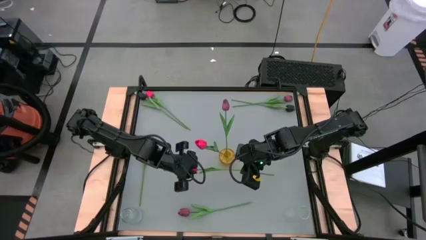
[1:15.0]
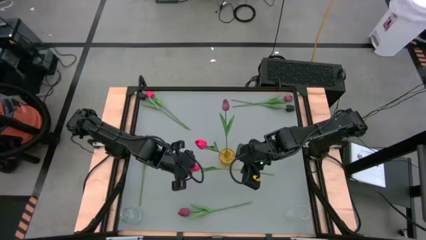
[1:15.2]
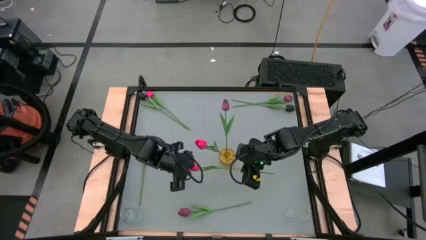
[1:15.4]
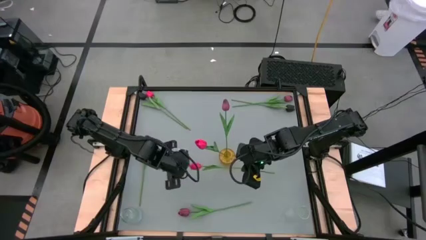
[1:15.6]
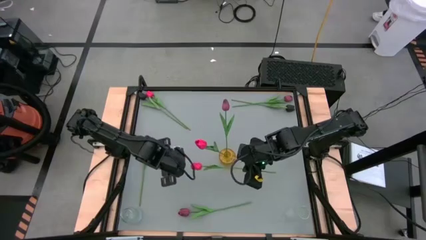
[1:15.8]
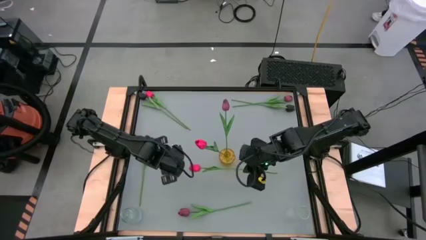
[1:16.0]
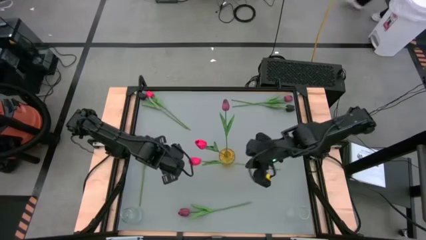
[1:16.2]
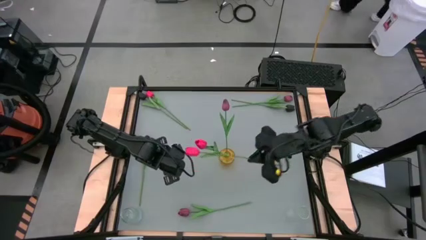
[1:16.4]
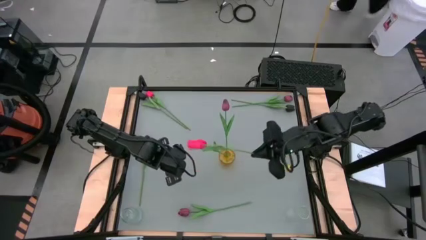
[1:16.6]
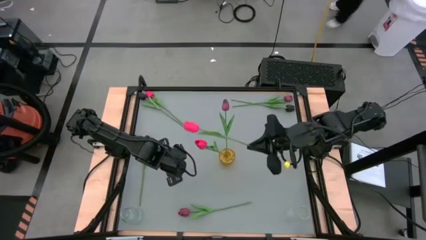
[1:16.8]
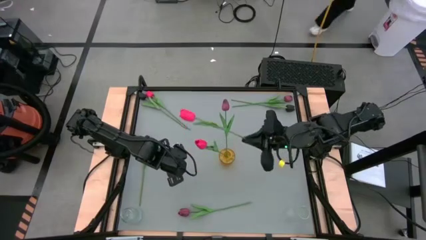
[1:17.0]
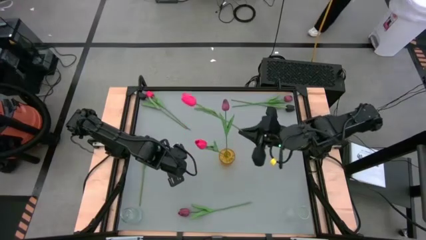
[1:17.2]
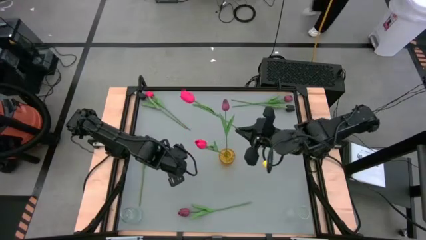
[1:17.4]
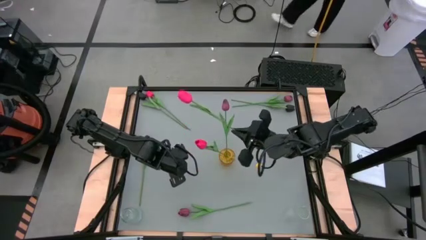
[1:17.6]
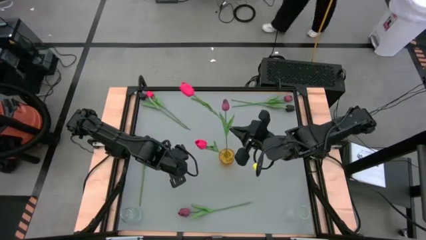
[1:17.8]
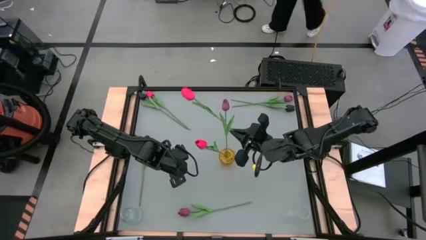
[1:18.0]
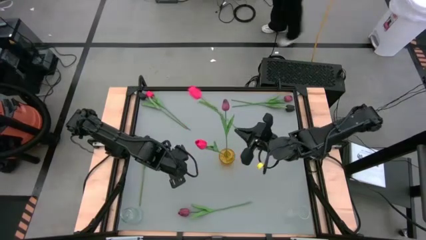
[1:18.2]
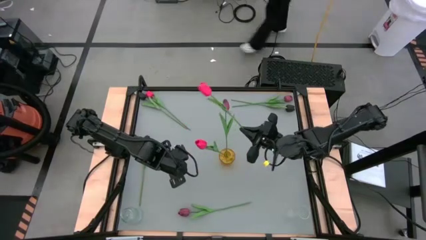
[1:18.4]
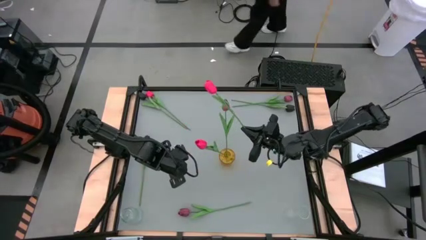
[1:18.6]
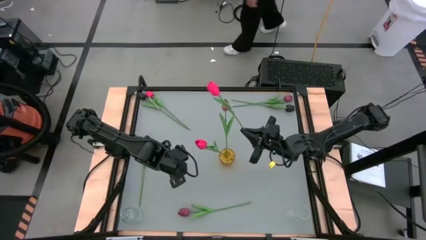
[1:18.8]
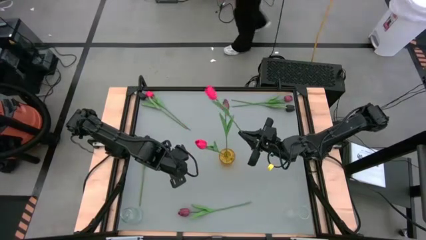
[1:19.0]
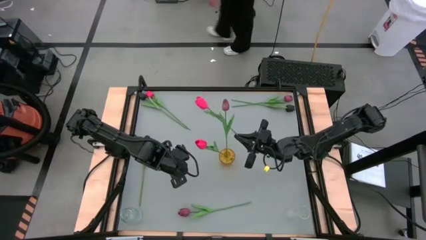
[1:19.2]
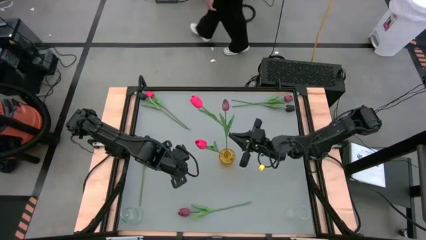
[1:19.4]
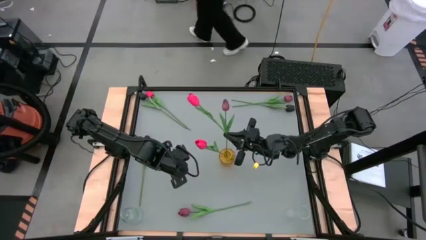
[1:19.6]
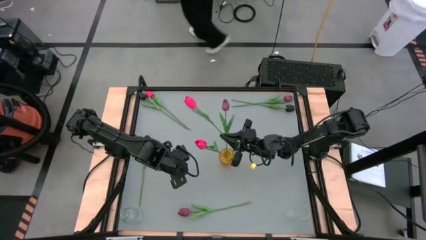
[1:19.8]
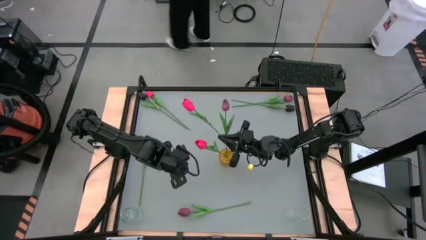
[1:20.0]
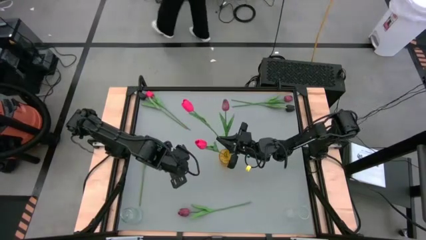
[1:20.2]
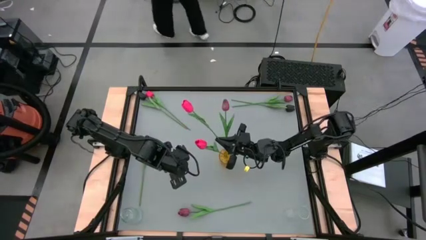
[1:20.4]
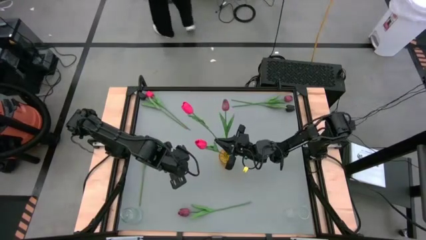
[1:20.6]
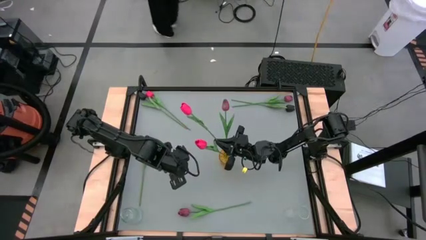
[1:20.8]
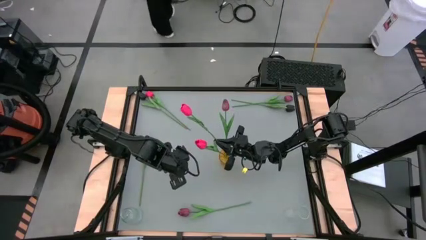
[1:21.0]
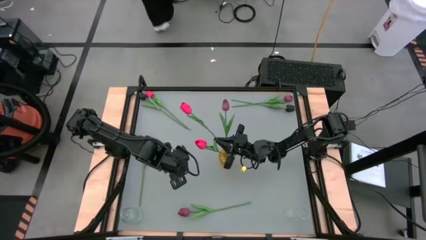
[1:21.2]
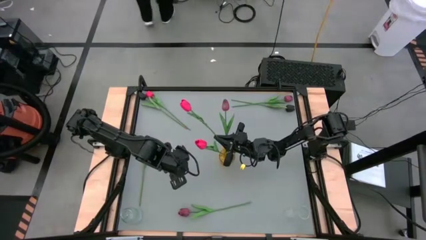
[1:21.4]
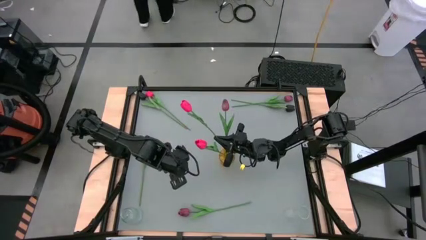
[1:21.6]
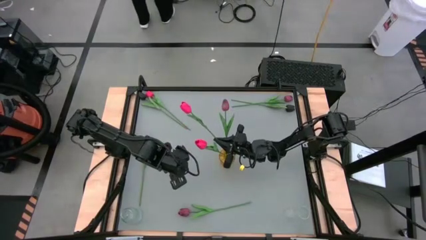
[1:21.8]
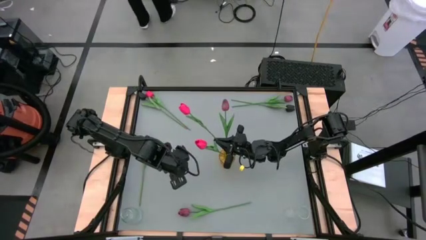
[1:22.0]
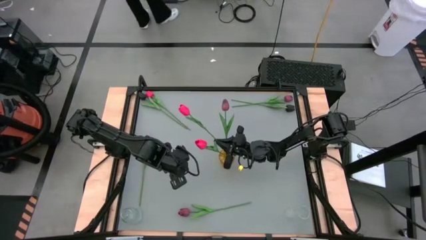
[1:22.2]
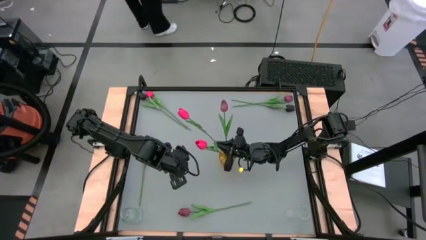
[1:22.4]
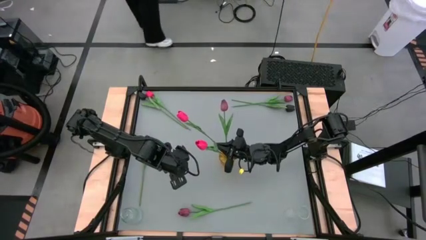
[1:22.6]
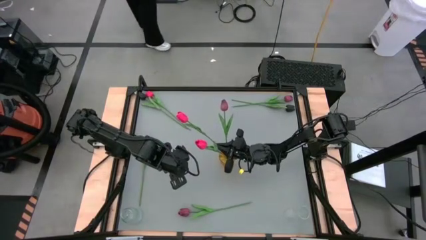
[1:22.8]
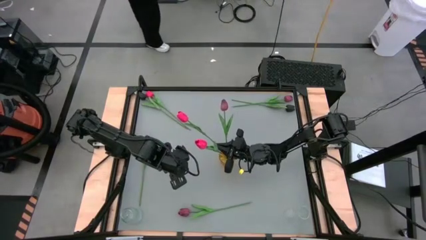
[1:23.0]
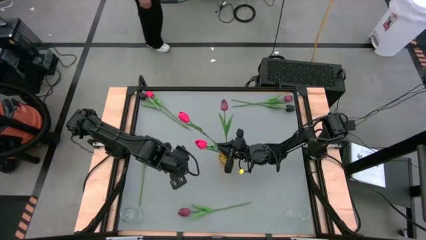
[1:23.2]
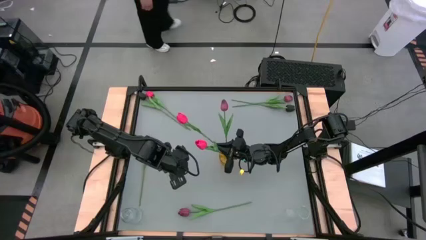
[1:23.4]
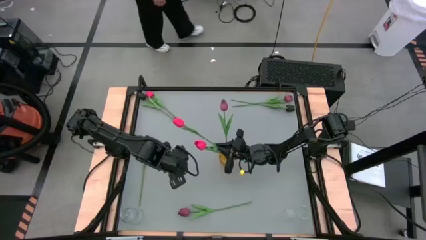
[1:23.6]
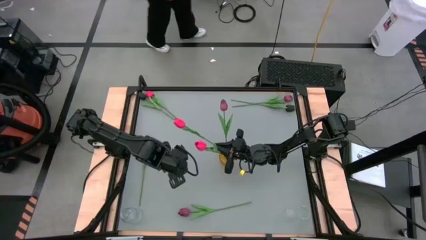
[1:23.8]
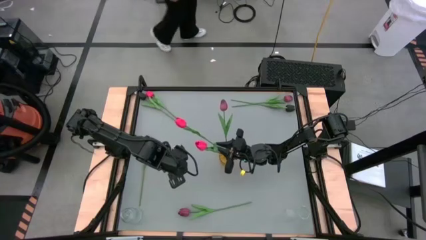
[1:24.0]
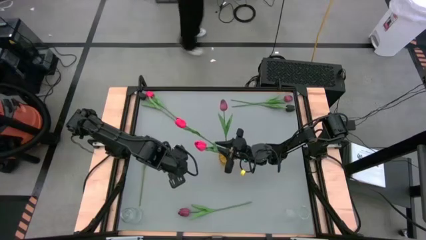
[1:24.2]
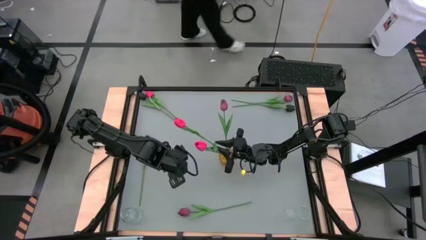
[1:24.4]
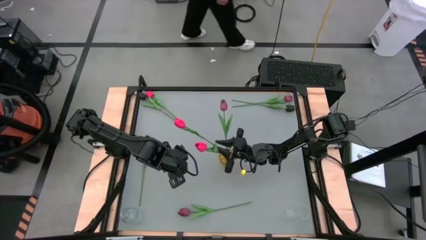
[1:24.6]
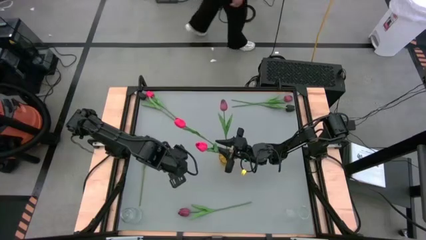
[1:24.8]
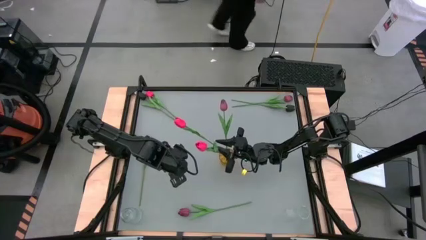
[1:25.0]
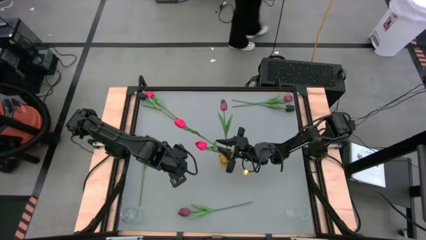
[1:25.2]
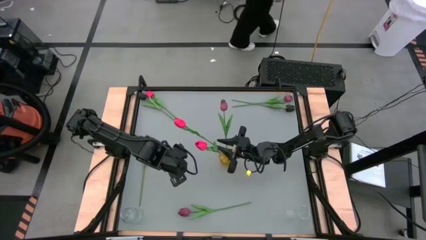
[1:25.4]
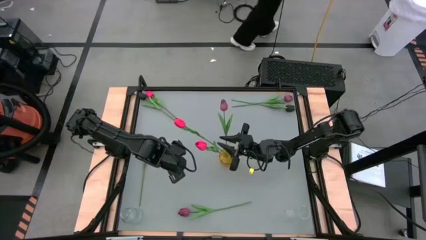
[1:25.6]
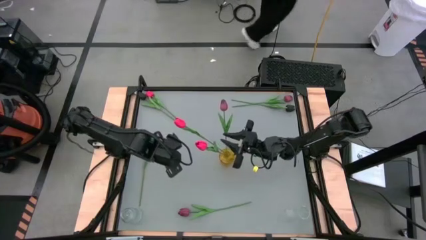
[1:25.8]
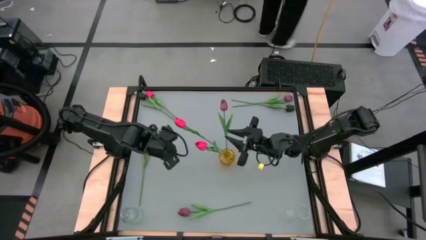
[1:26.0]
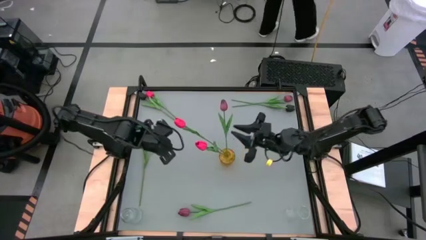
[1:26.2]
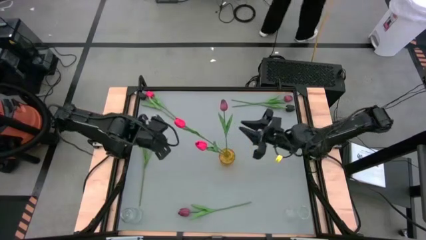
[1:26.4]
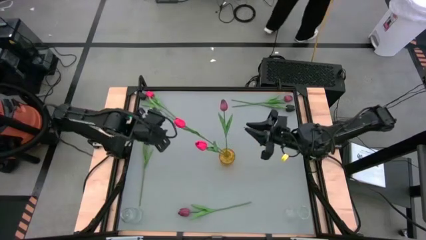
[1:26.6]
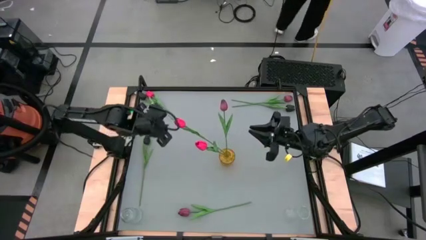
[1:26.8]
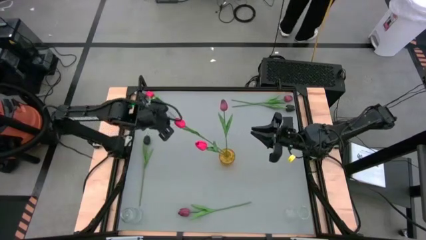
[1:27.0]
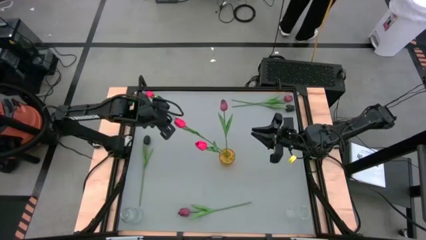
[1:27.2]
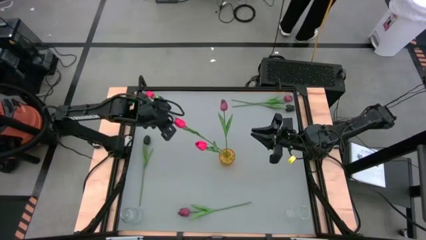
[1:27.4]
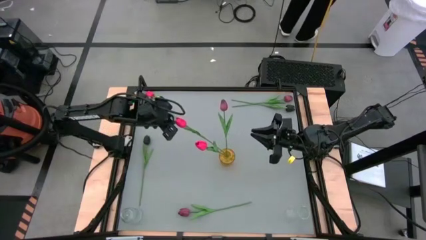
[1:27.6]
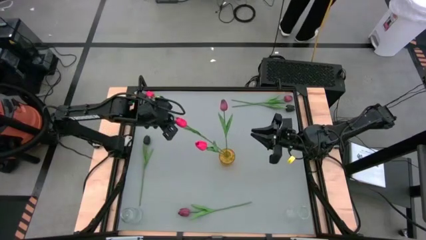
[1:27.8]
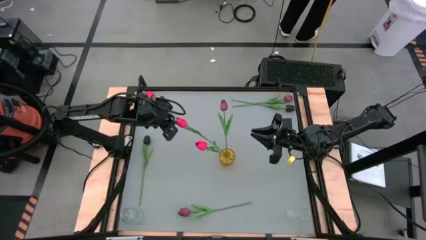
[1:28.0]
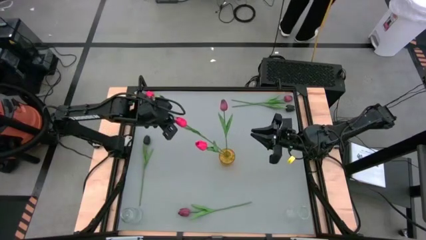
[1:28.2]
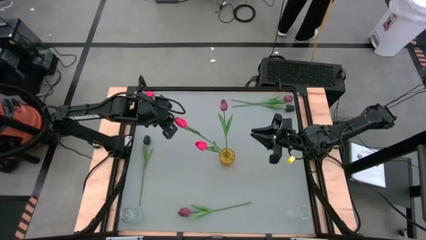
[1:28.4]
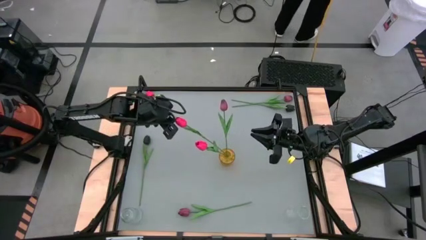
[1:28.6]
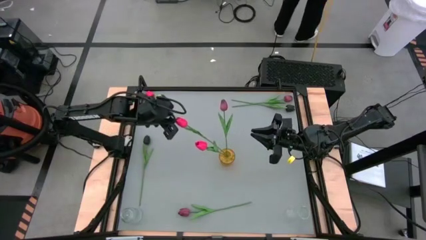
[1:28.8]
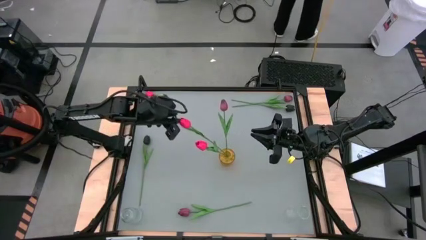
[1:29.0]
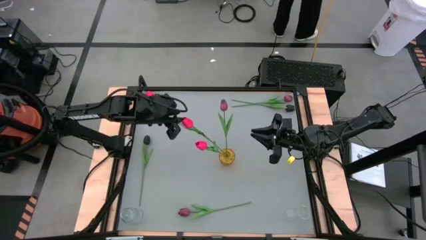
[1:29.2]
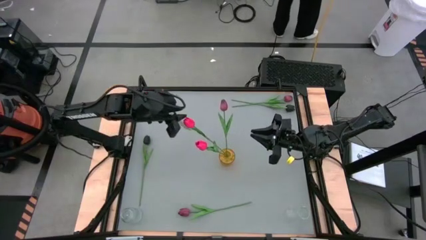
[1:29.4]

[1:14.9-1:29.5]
Task: Sort flowers into vase by color
Put the bottom pink flower into the yellow vase
